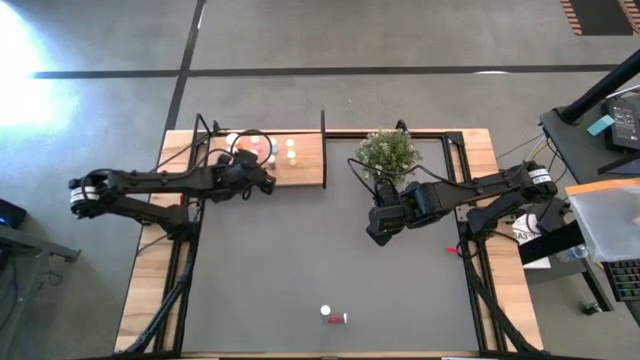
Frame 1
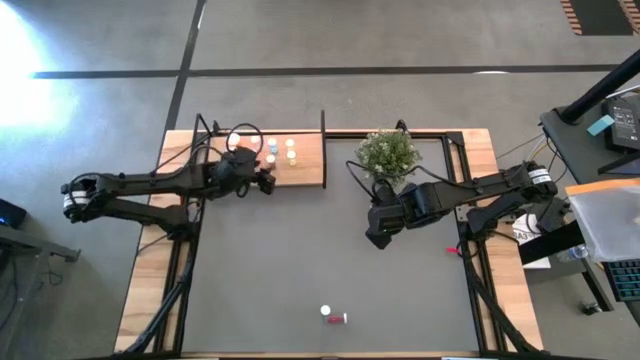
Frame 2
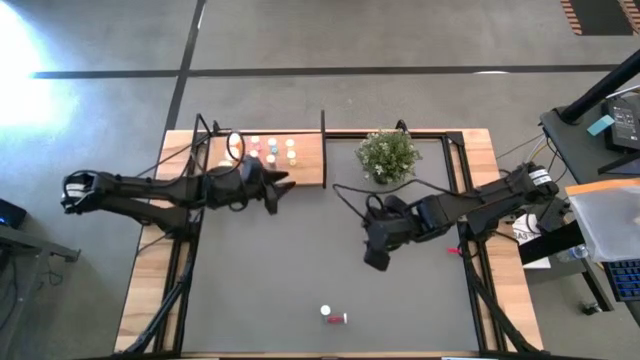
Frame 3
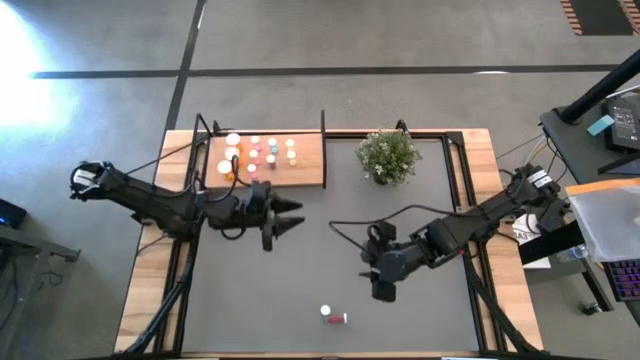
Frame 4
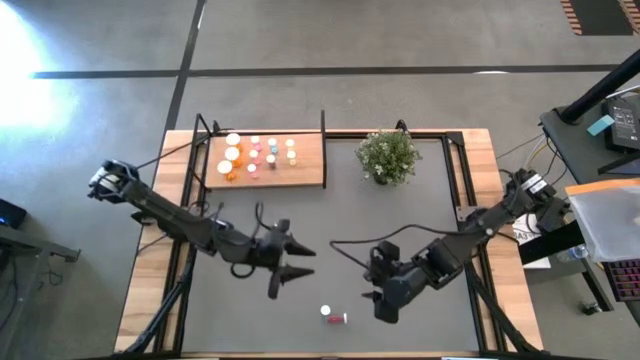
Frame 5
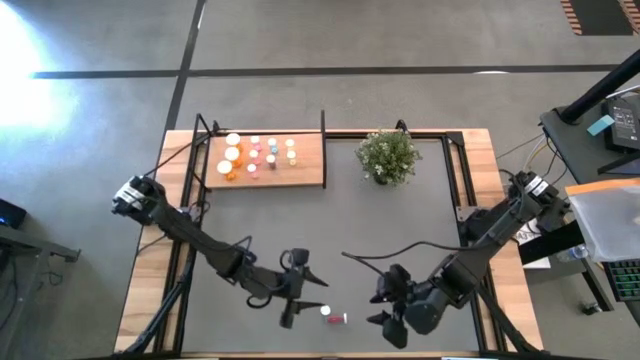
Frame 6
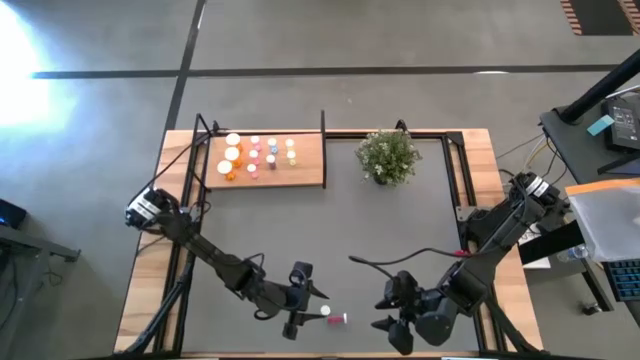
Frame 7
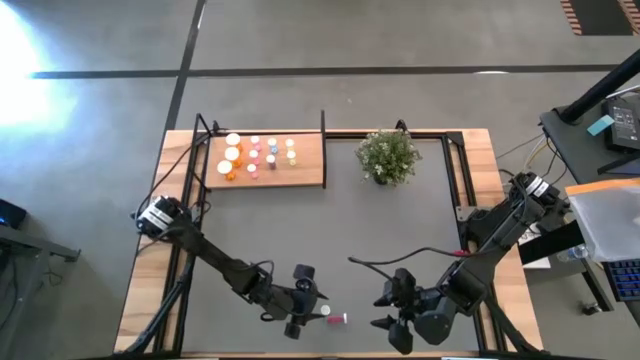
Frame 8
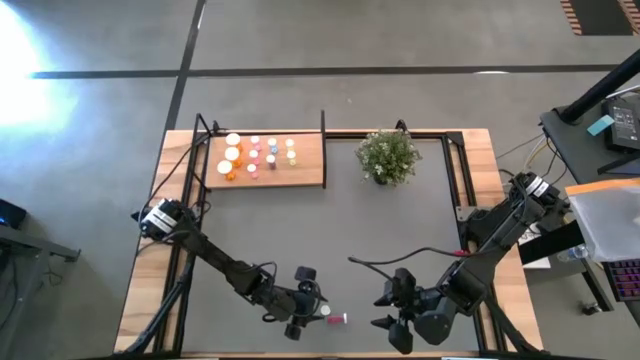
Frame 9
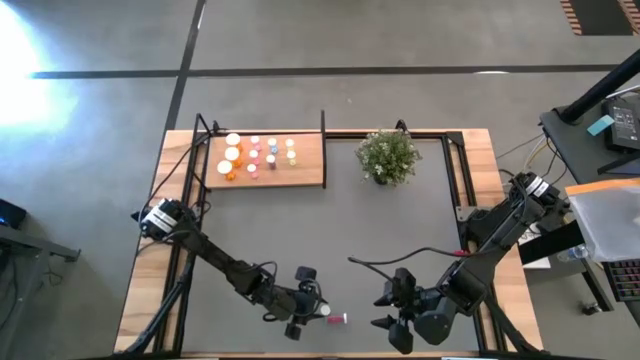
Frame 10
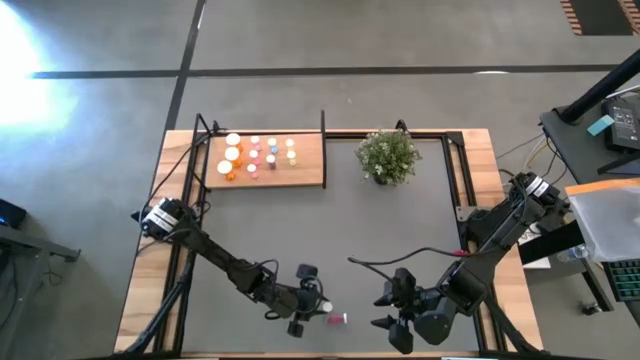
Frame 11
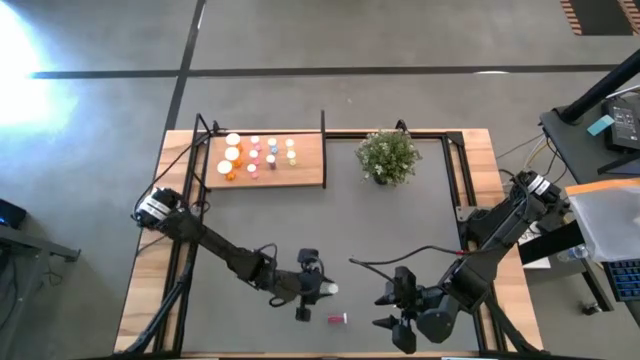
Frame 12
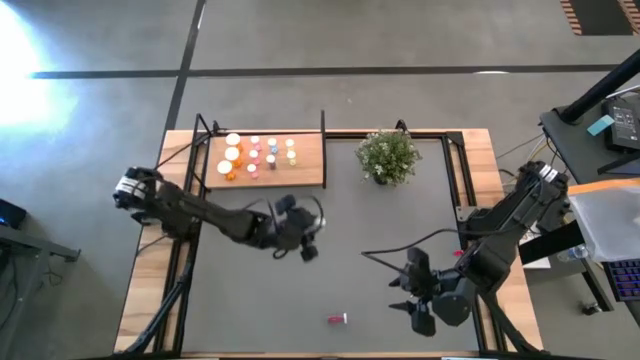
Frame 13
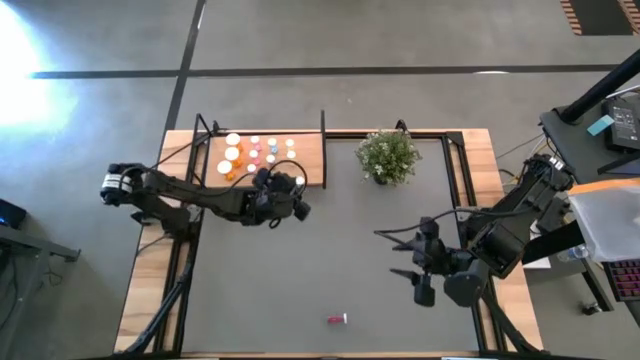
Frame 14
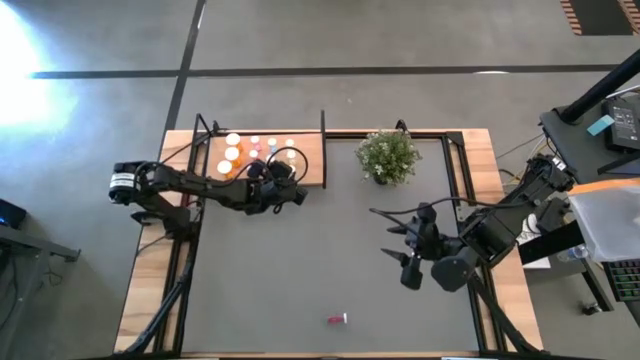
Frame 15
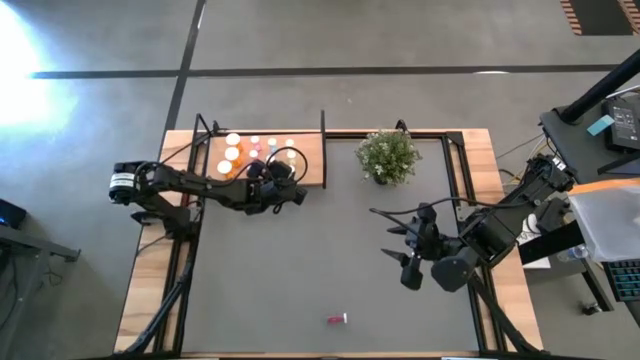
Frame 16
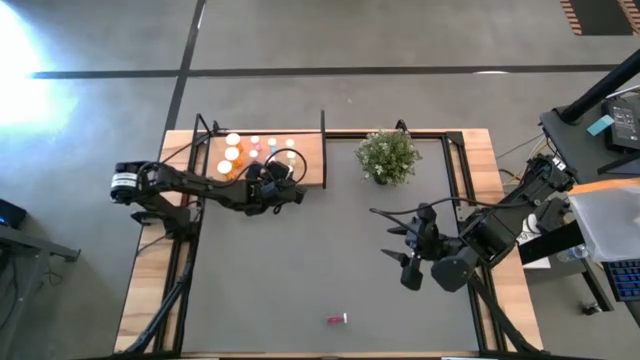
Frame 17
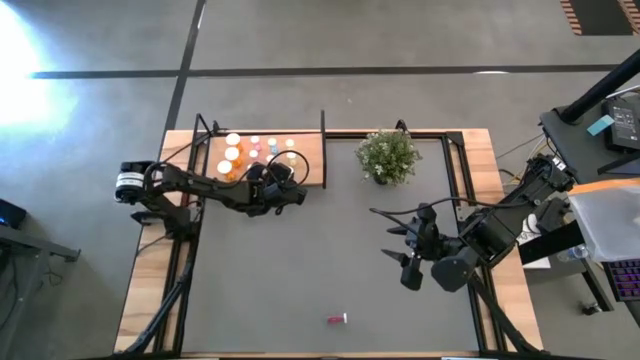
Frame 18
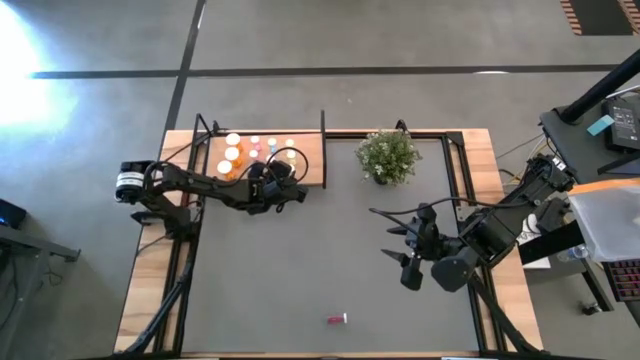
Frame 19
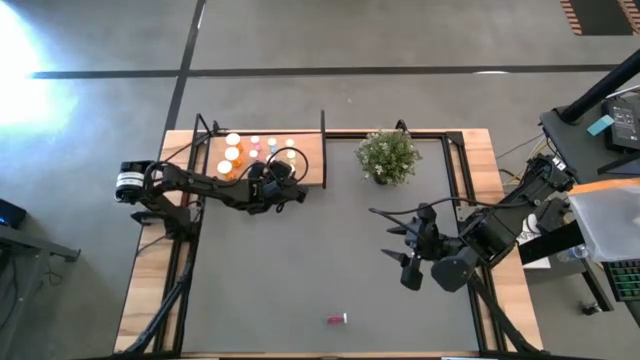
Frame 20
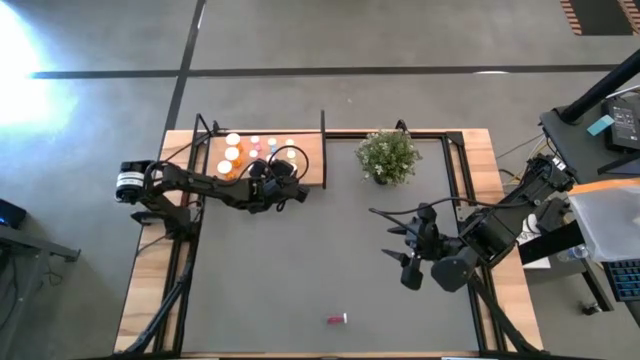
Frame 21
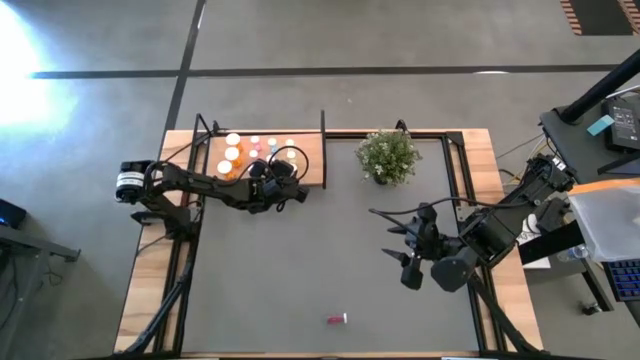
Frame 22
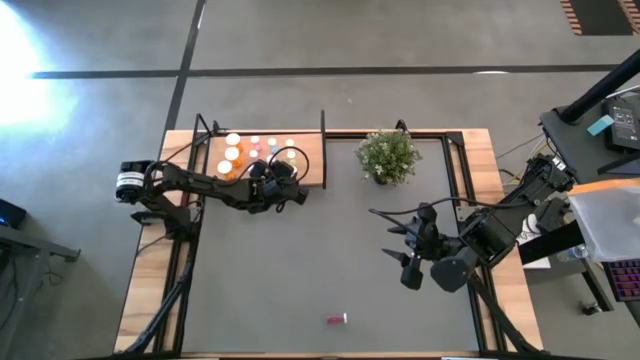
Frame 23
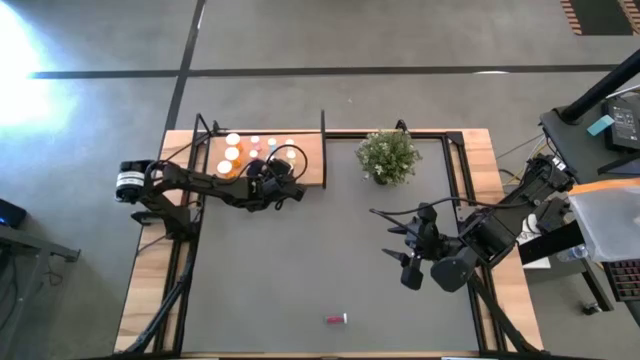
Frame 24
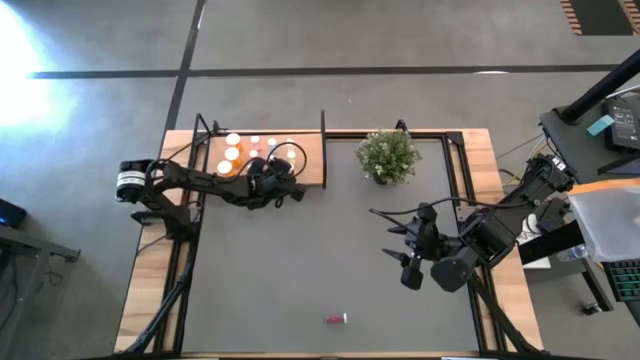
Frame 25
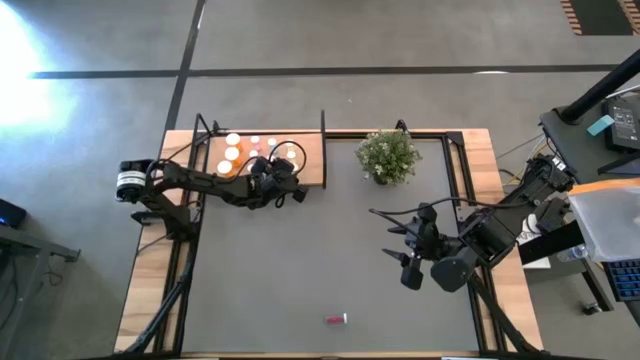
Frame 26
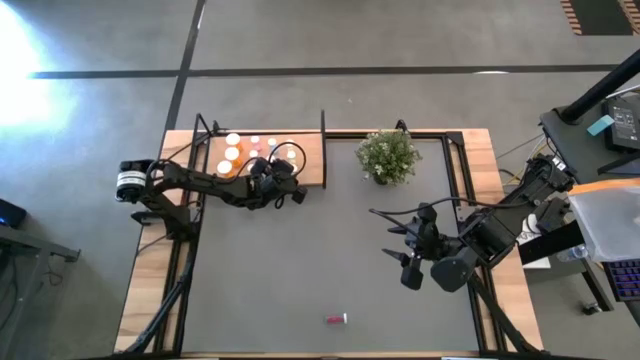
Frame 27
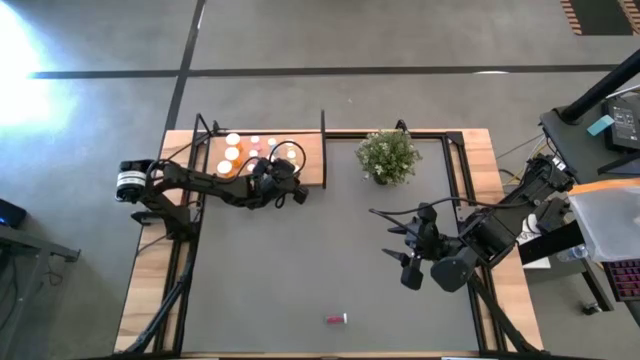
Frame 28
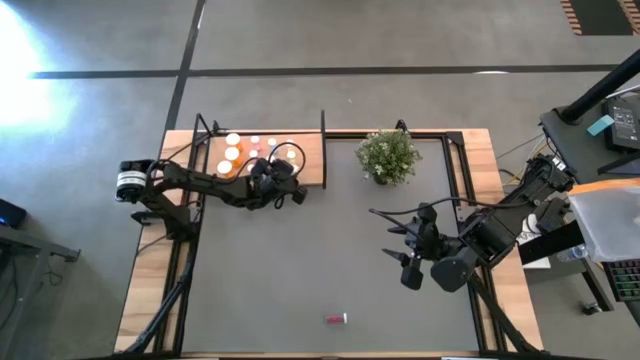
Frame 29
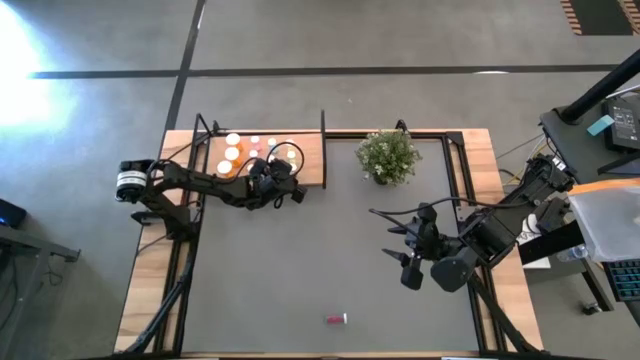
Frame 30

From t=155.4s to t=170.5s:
Task: Pick and place medicine bottles onto shelf by color
Put the small yellow pill bottle on the shelf aligned with the other small yellow pill bottles

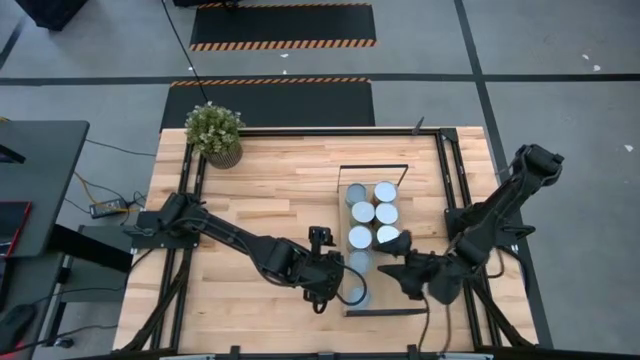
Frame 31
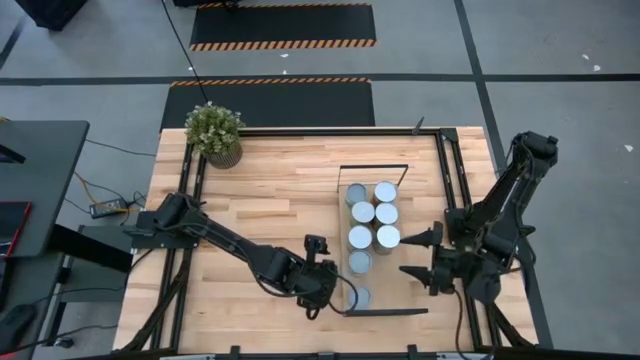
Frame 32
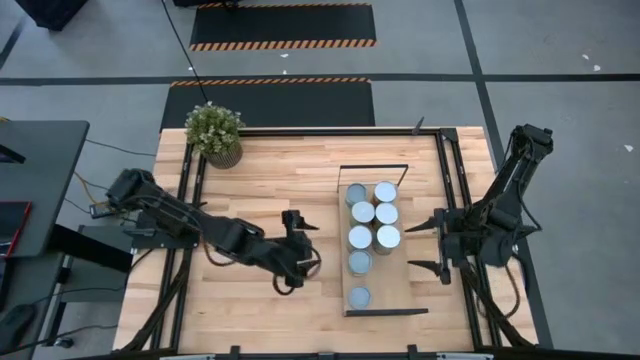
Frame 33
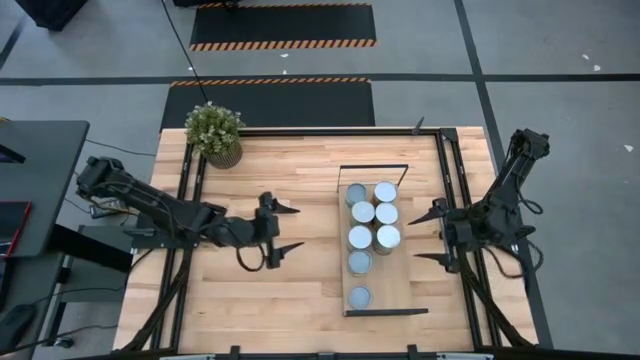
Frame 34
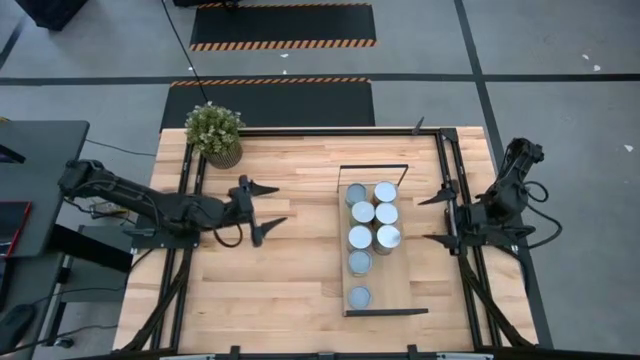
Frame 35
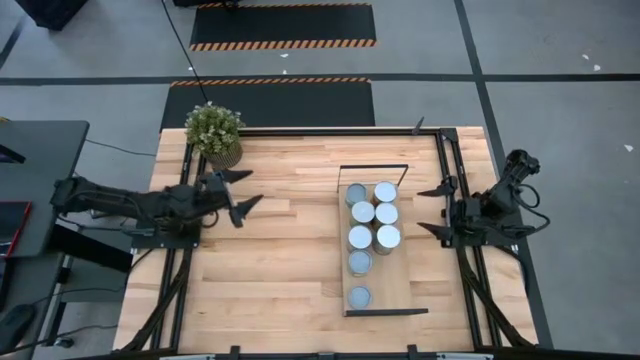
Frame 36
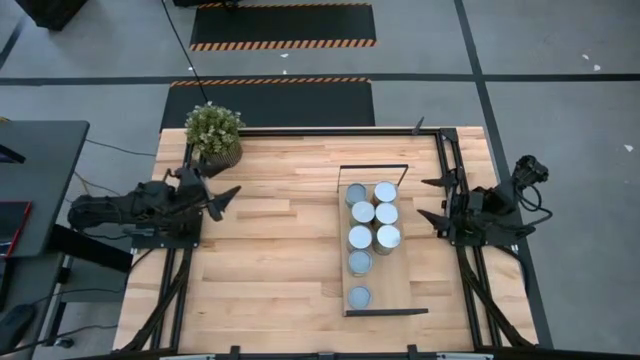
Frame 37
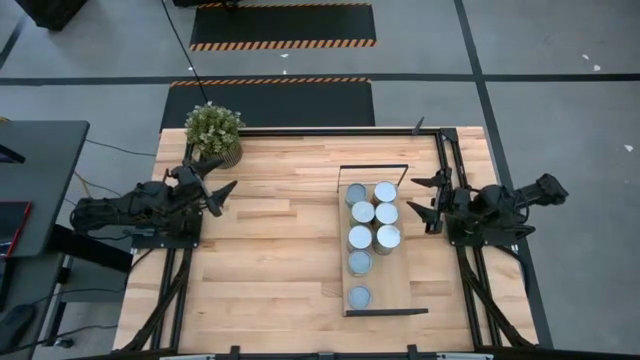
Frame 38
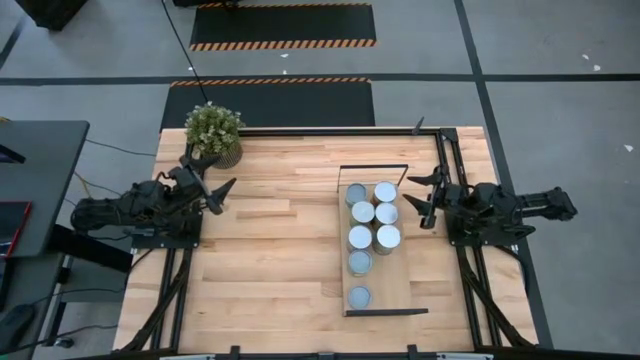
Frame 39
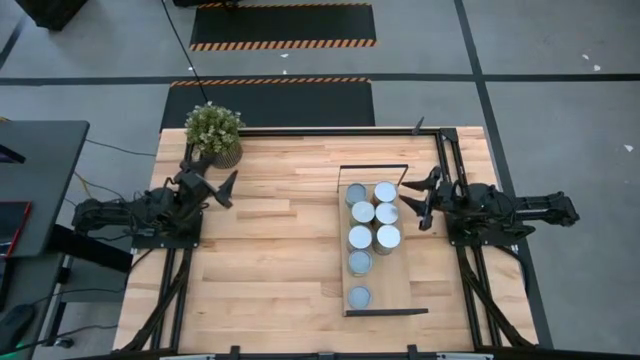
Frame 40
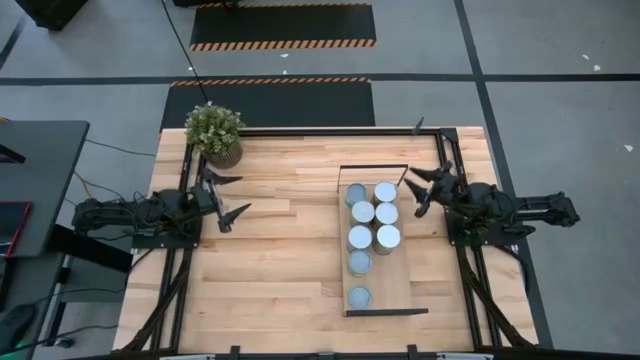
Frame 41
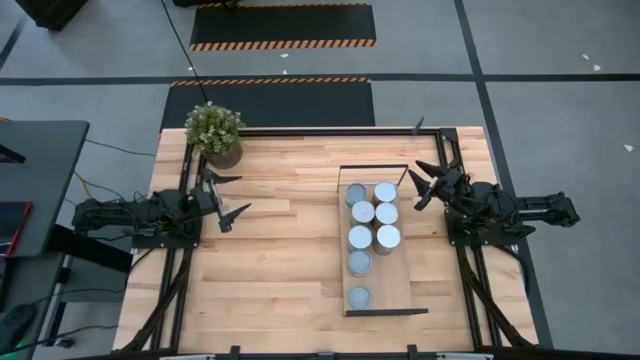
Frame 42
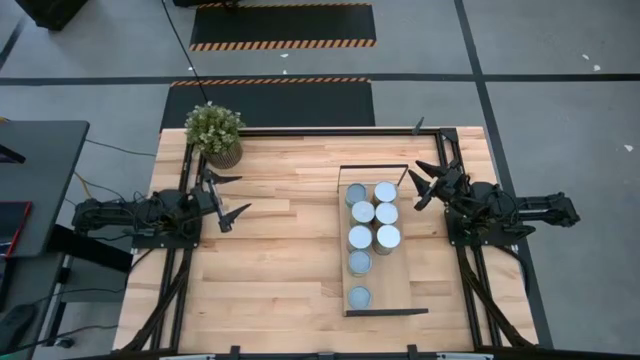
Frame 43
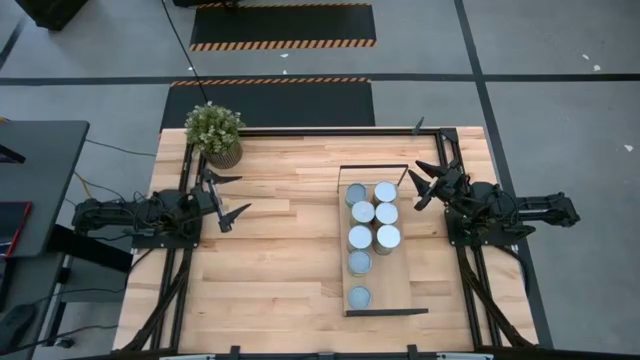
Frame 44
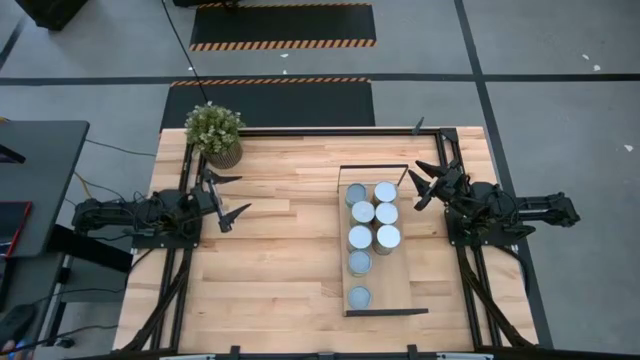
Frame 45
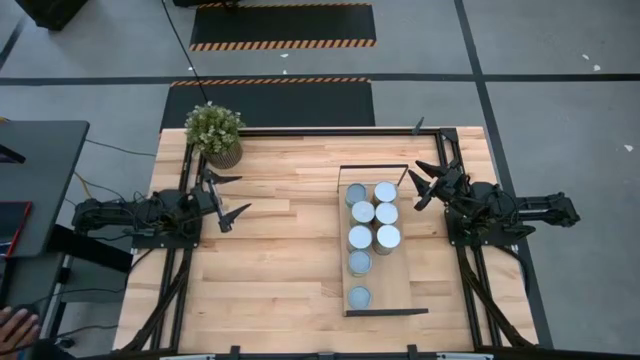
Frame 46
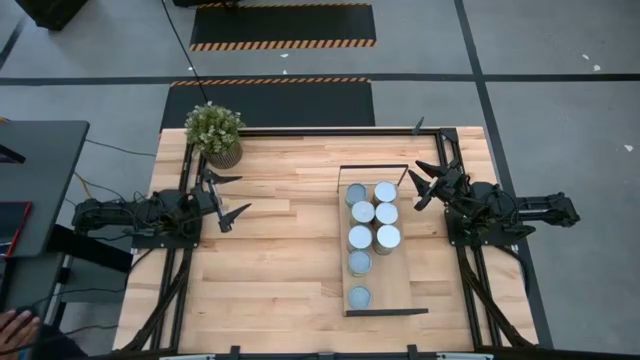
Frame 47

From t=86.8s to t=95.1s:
Task: Pick and place cans onto a shelf
Return to Home Position
